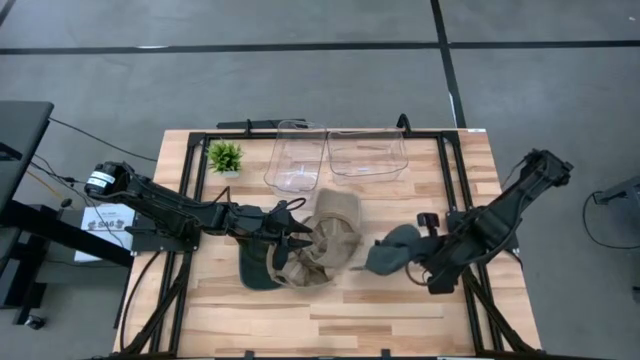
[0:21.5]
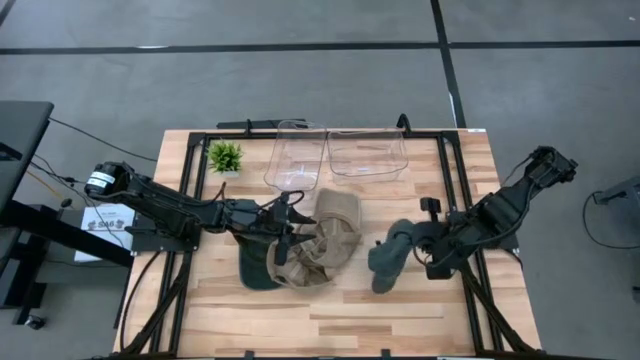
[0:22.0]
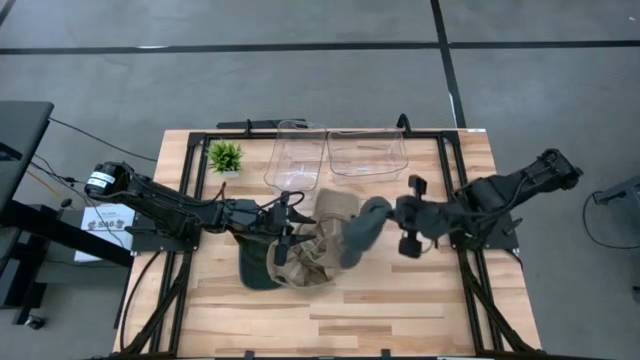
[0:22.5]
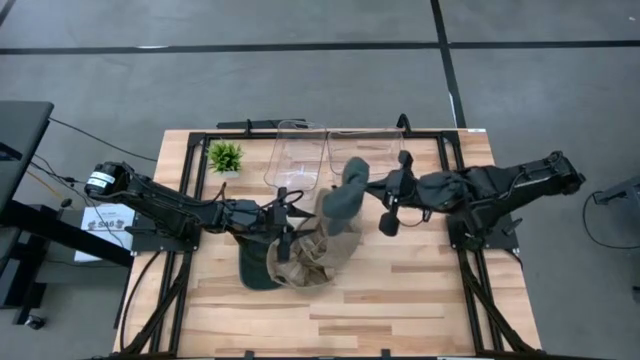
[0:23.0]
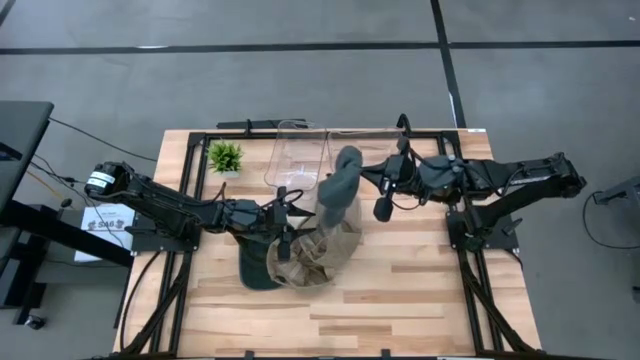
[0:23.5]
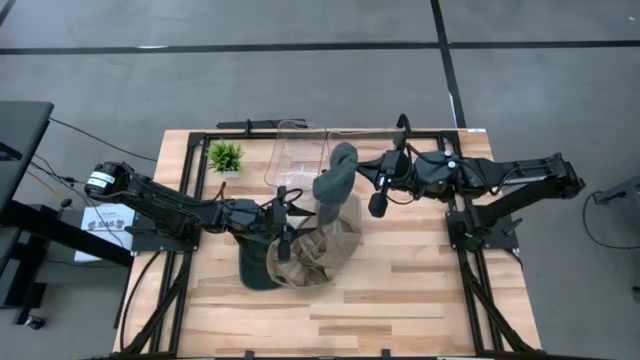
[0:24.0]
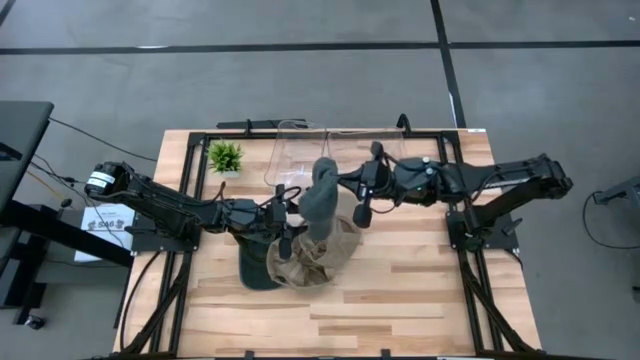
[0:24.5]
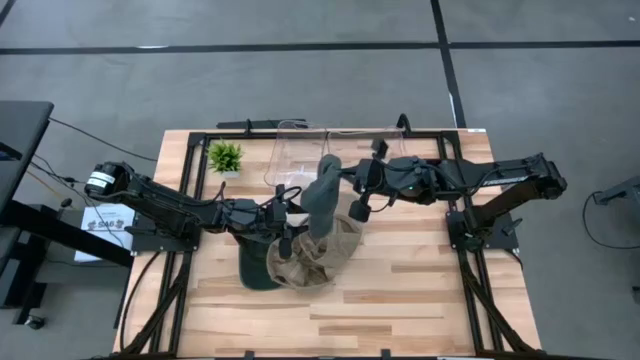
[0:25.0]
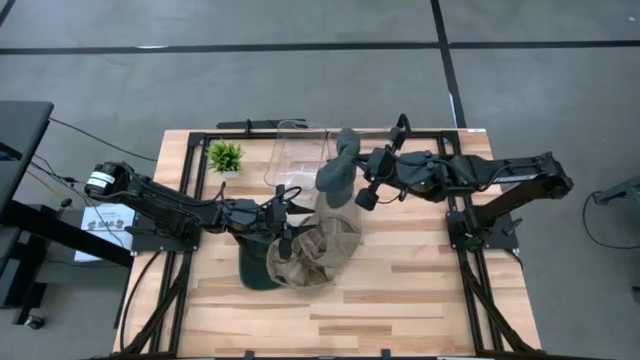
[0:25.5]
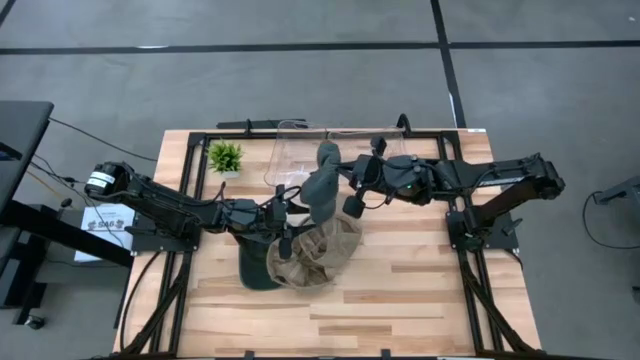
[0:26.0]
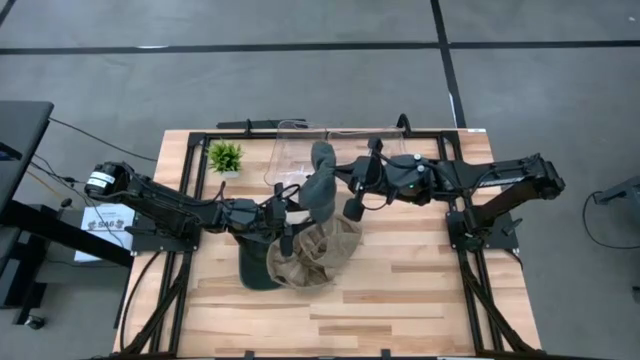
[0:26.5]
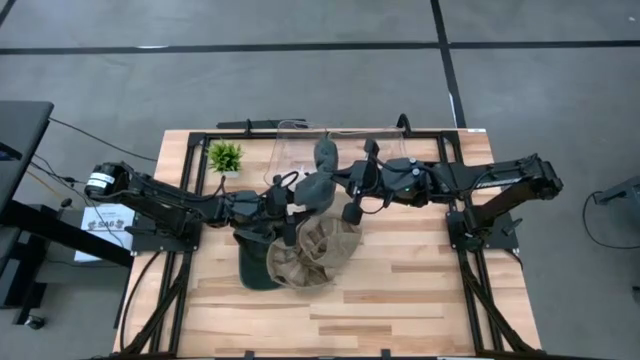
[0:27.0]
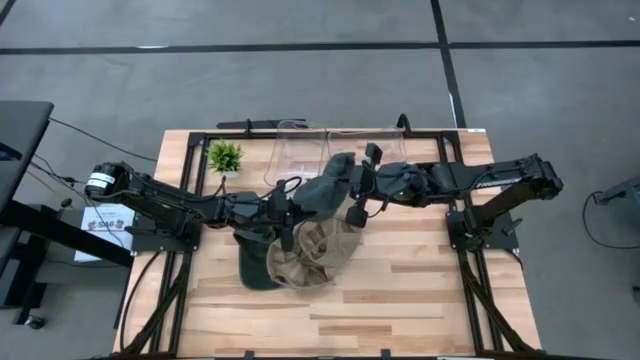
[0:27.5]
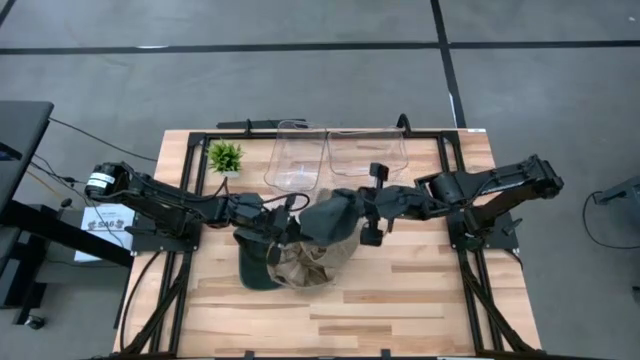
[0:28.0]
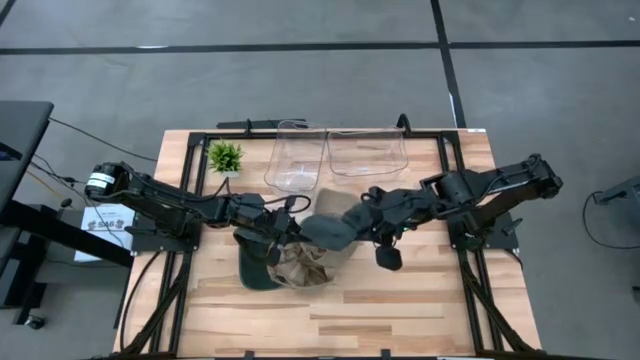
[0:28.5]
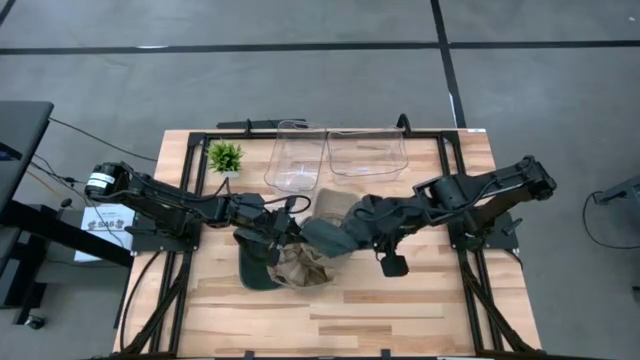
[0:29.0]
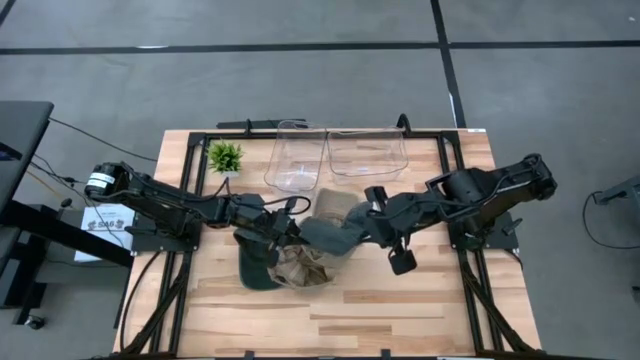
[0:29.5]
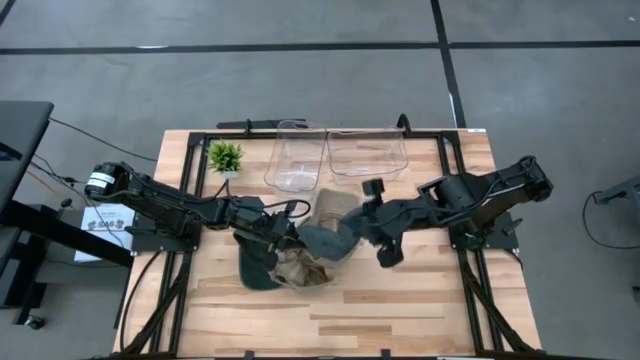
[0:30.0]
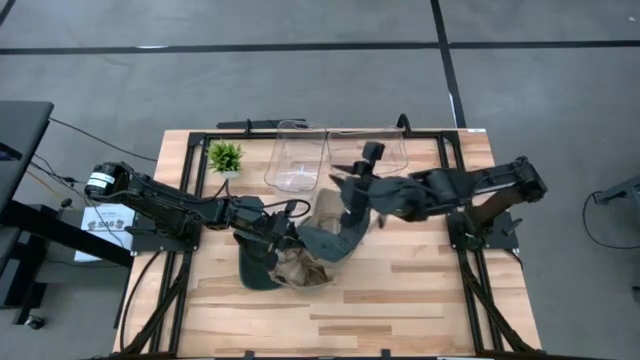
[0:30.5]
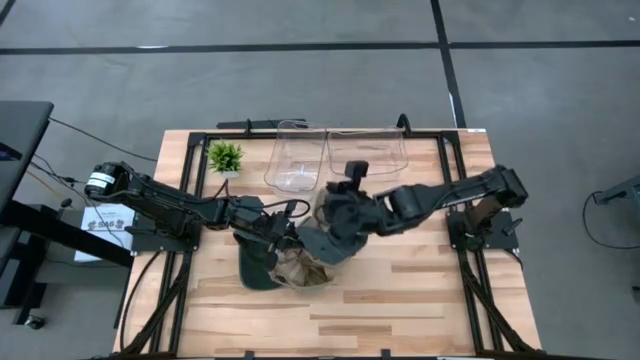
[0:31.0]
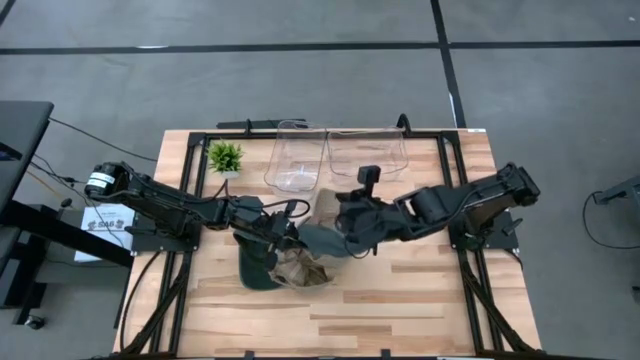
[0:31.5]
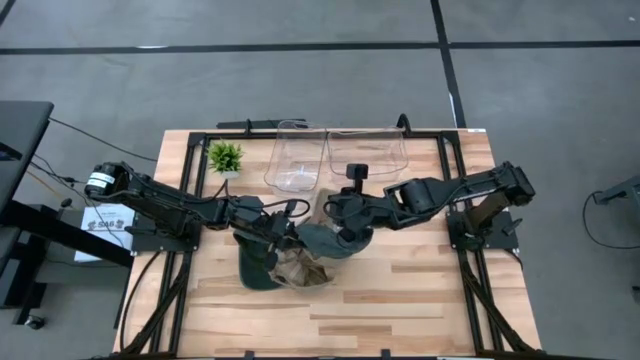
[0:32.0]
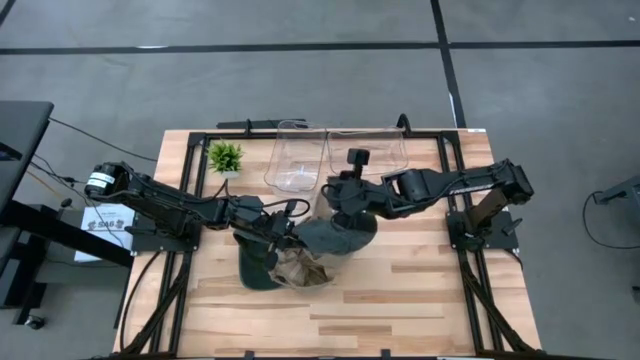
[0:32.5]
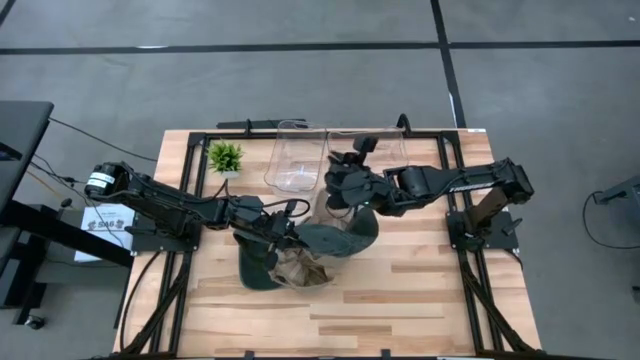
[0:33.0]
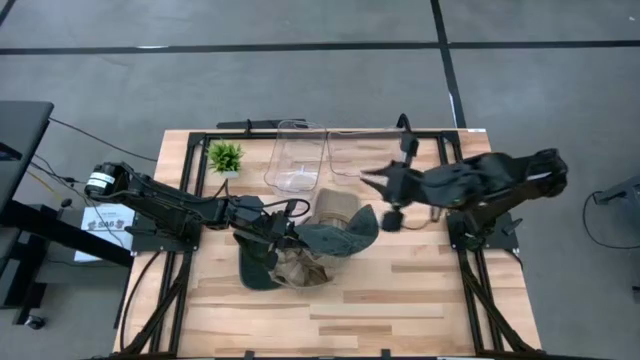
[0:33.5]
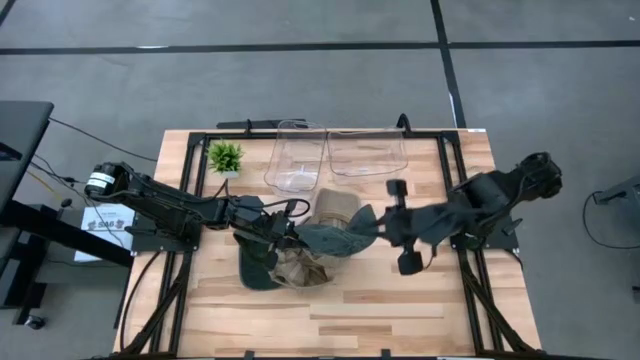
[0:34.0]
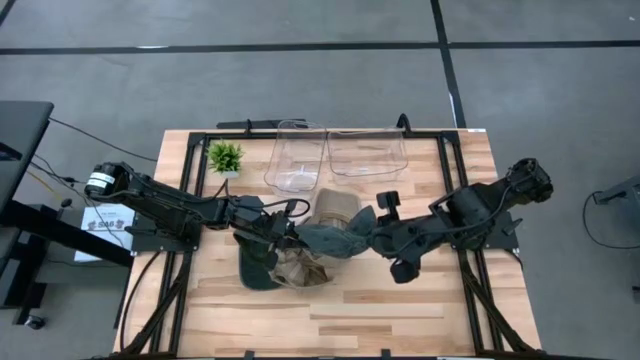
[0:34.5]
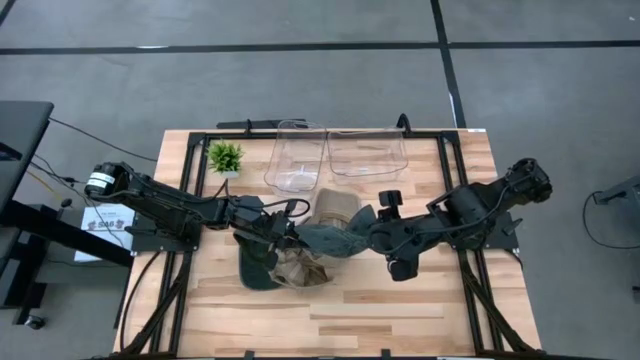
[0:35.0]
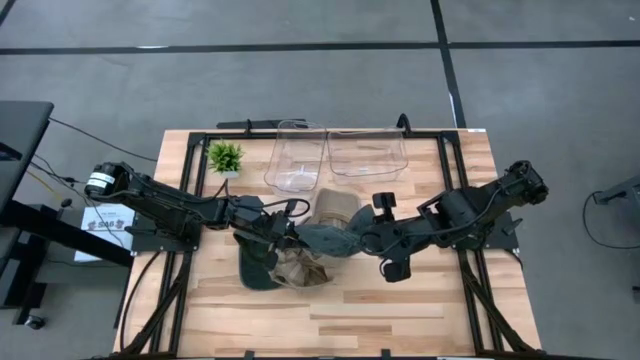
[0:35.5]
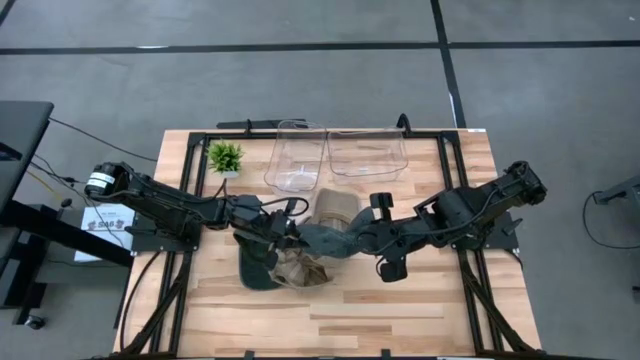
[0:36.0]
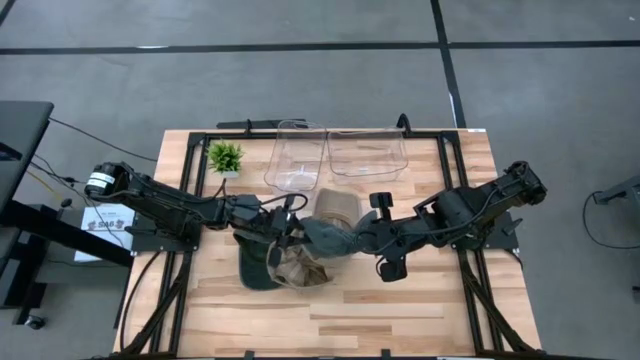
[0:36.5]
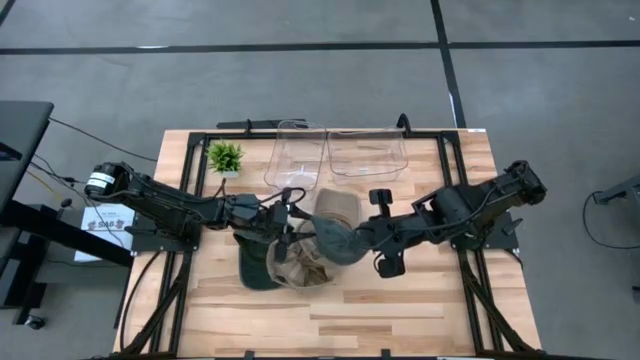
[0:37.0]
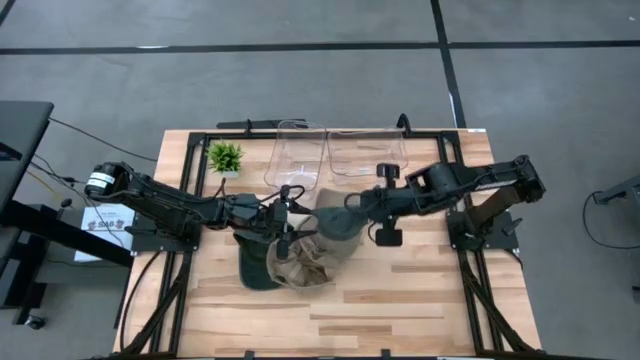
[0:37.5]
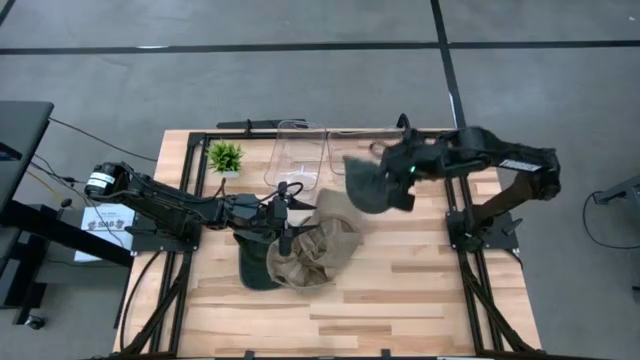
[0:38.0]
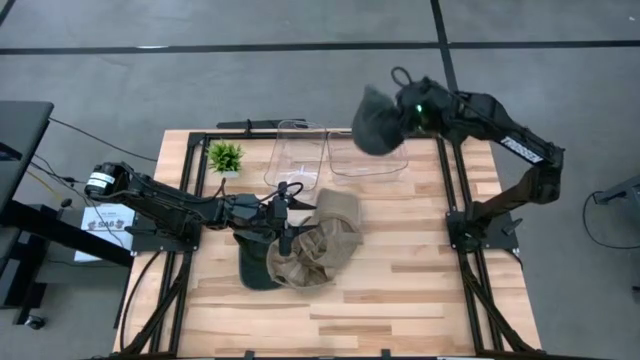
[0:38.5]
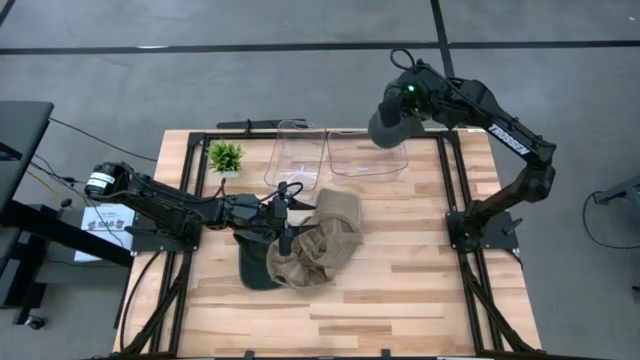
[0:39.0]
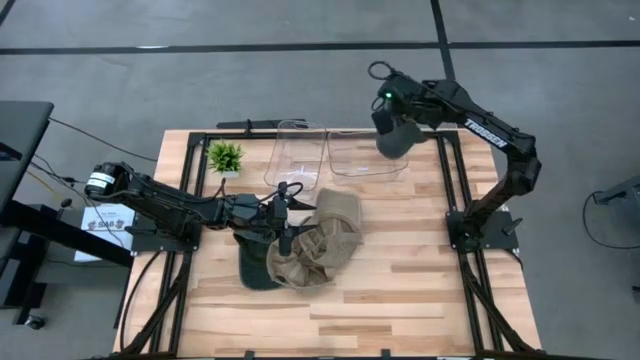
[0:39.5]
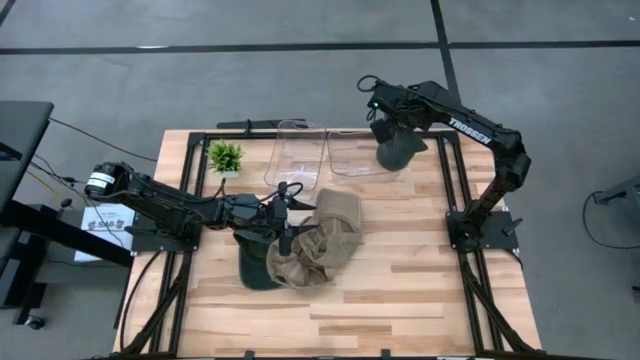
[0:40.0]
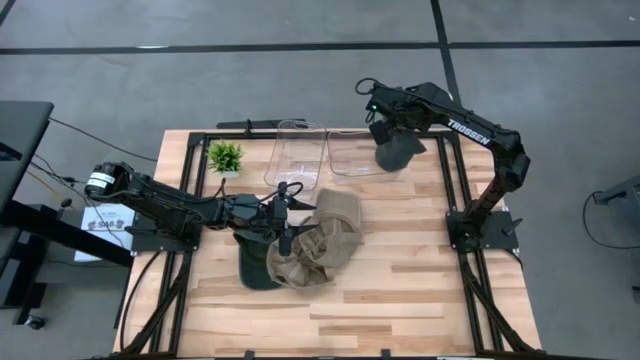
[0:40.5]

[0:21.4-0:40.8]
Task: Pick & Place hat
Put the right black cap into the right transparent bin
